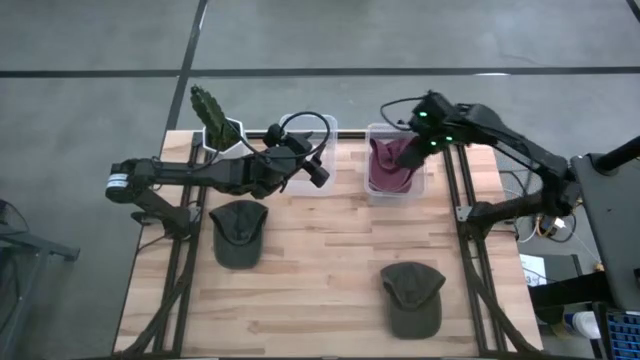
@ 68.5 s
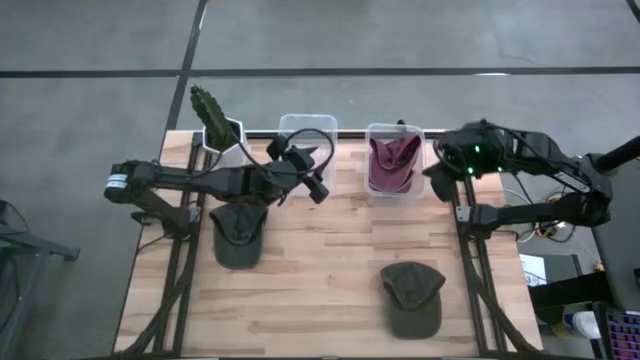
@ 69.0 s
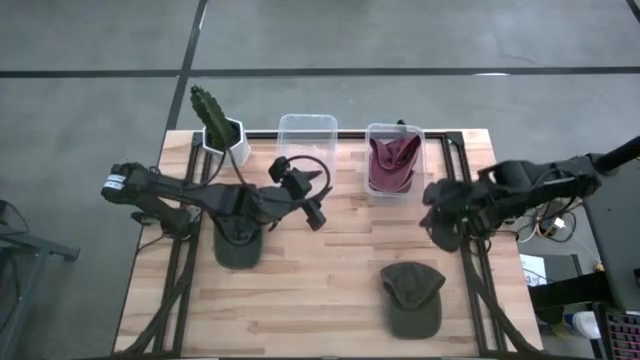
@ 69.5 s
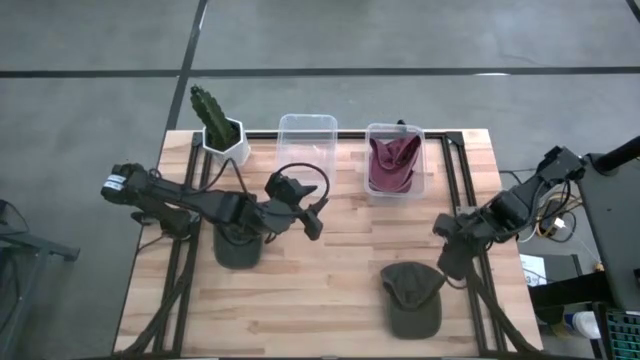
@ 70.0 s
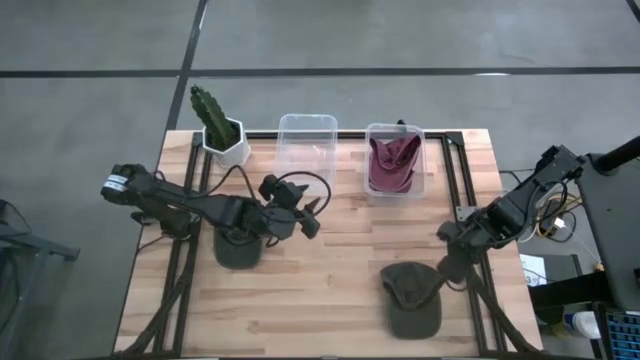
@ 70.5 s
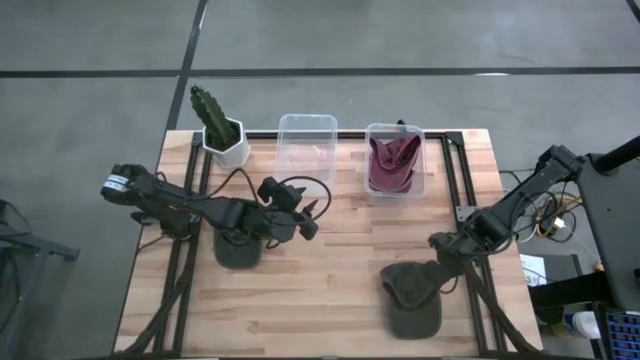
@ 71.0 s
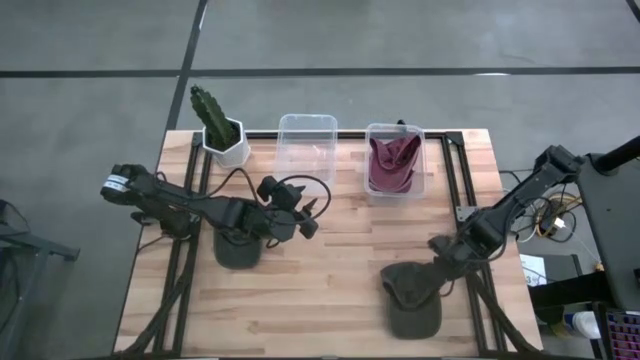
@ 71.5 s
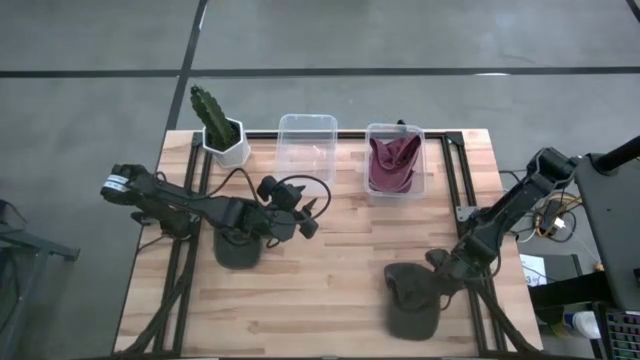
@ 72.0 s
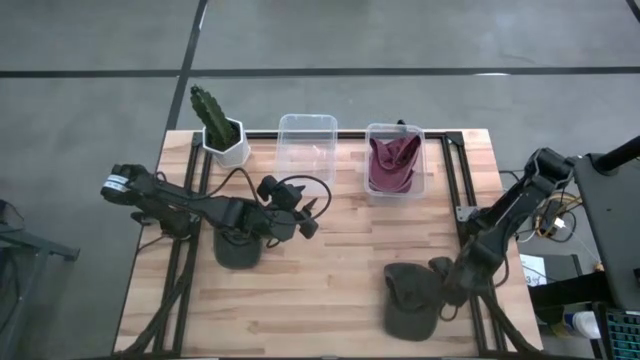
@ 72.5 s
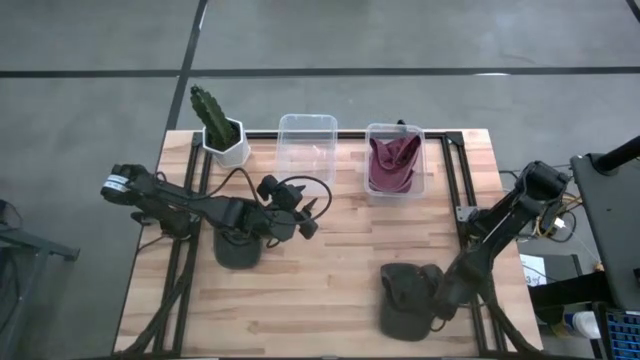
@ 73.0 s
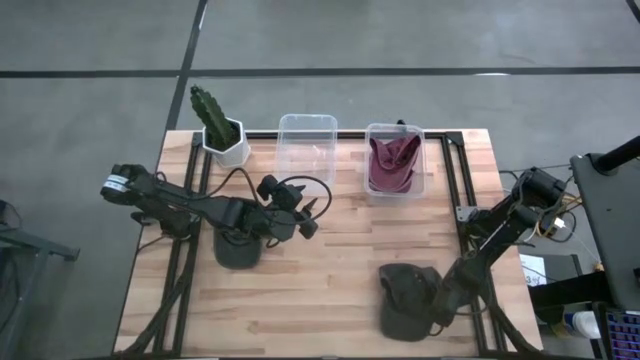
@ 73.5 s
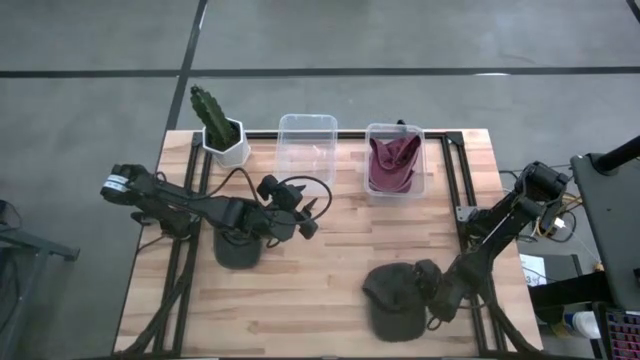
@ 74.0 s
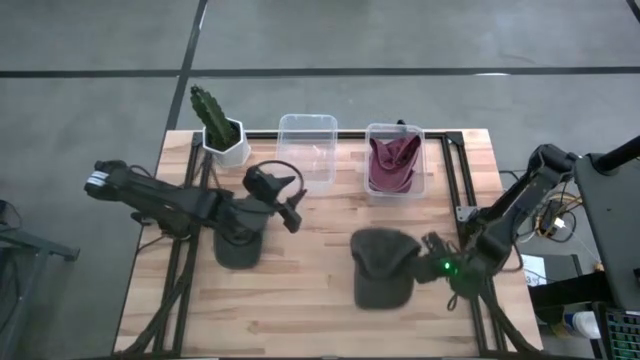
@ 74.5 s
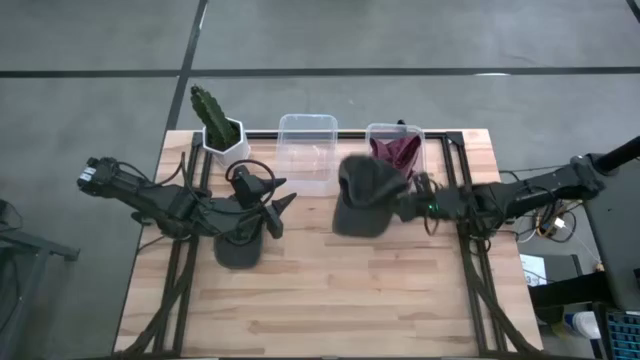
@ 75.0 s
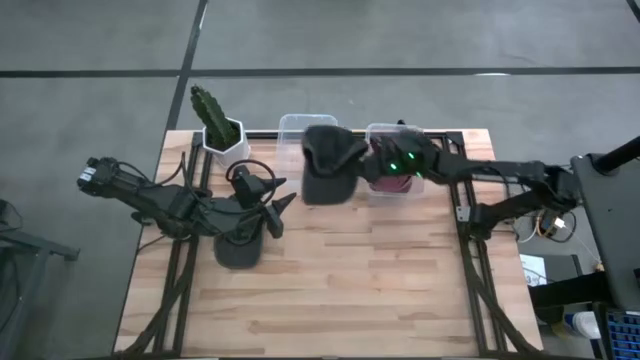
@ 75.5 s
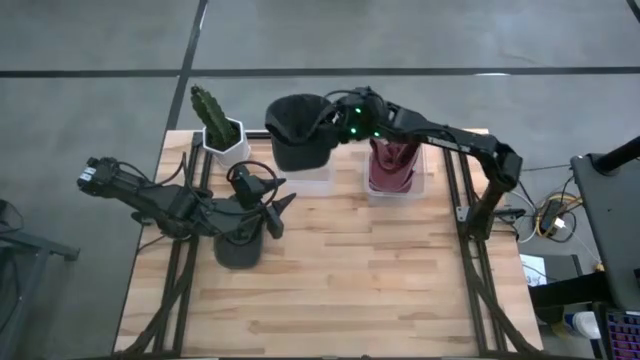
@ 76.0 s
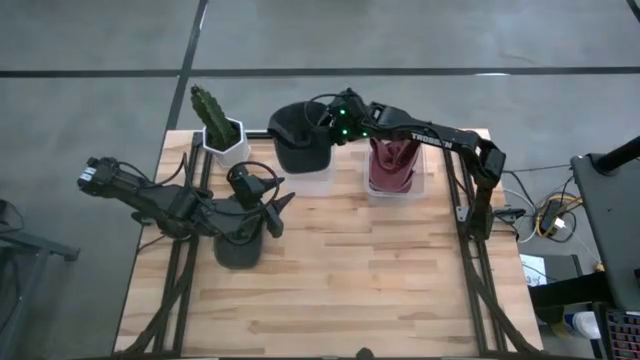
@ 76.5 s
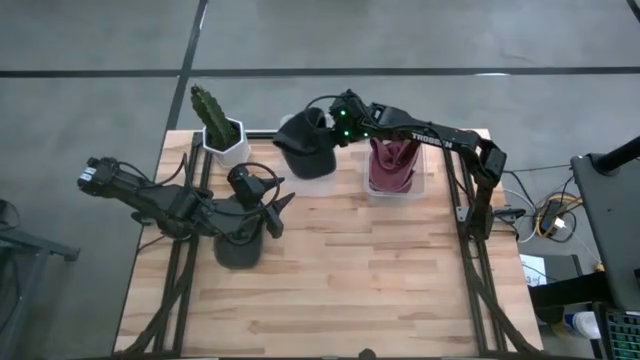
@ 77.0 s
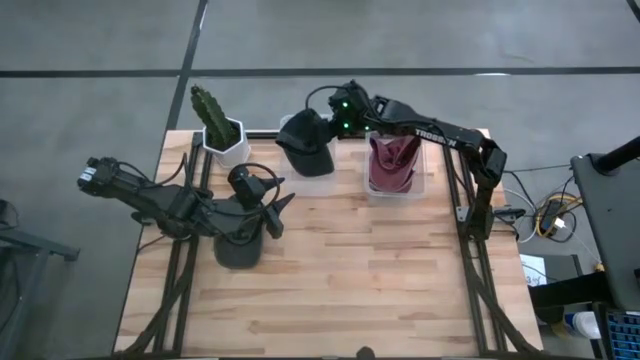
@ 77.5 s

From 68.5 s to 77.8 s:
Task: Pick & Place hat
Put the right black cap into the left transparent bin

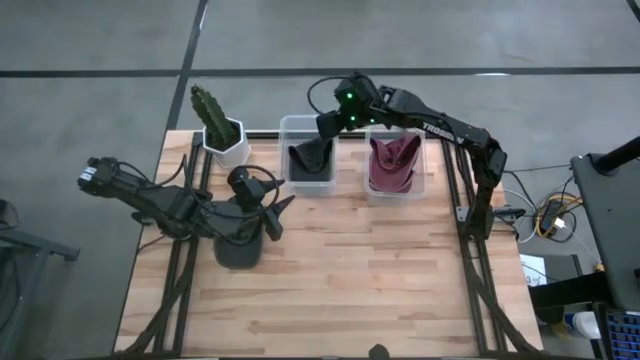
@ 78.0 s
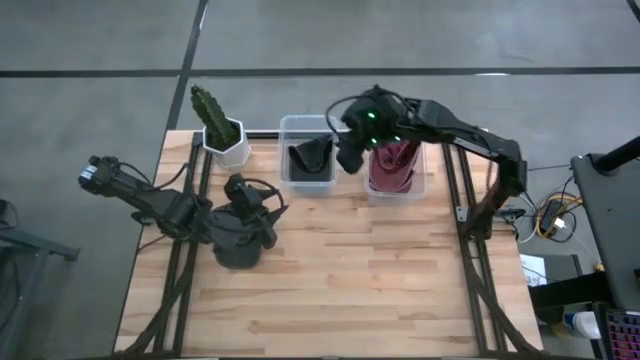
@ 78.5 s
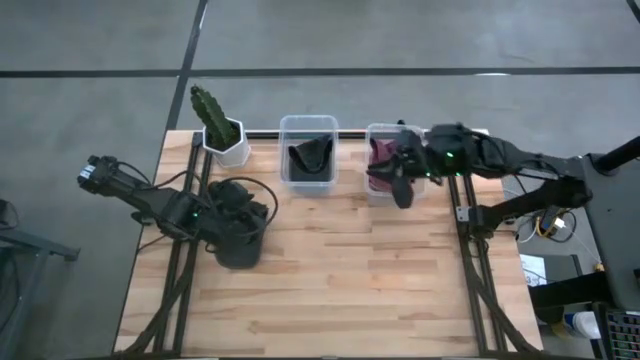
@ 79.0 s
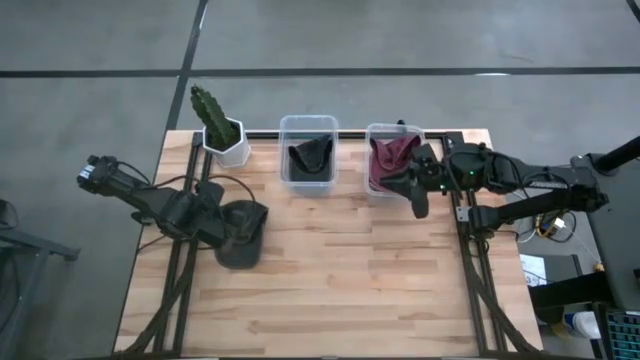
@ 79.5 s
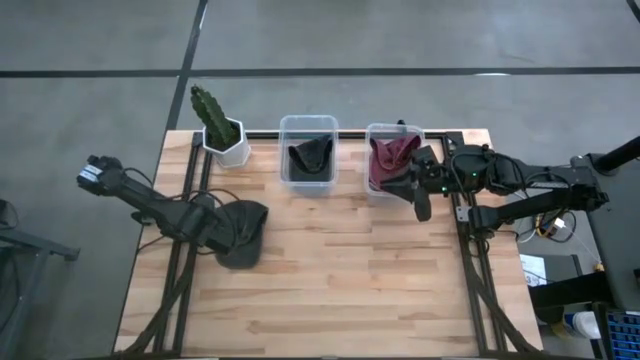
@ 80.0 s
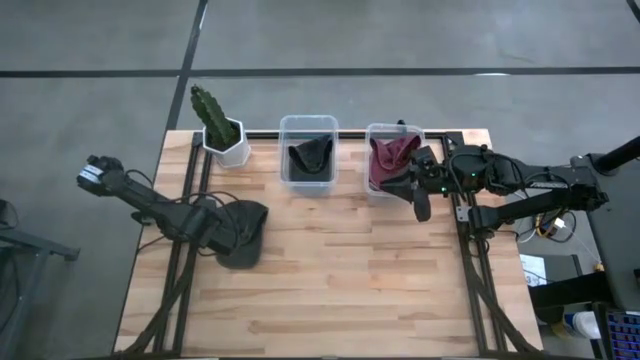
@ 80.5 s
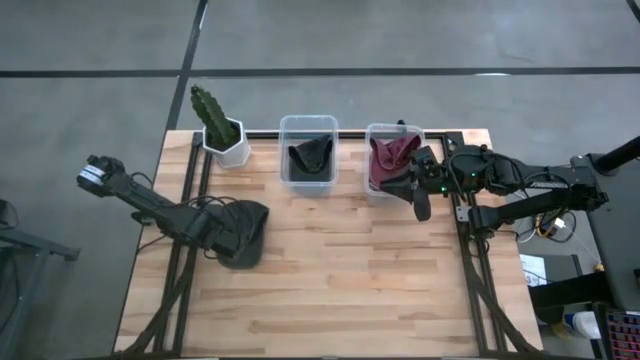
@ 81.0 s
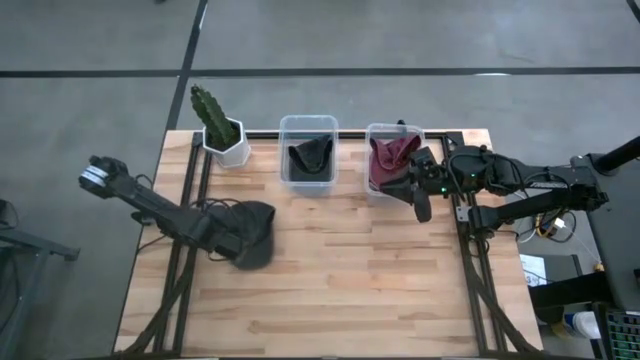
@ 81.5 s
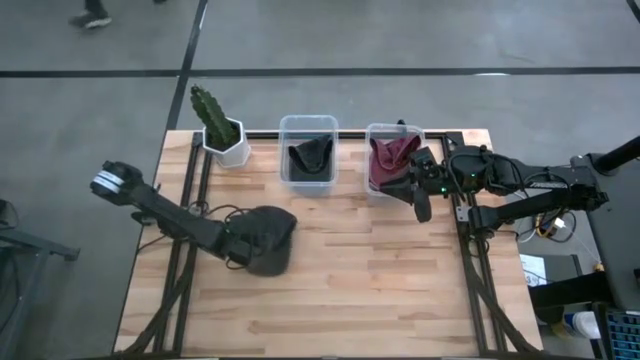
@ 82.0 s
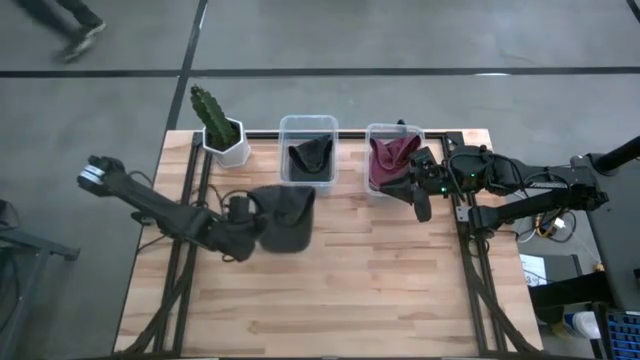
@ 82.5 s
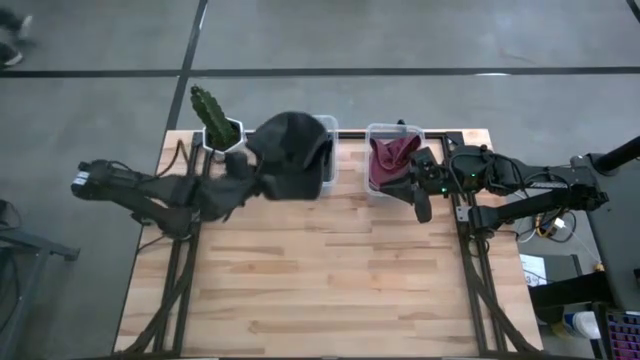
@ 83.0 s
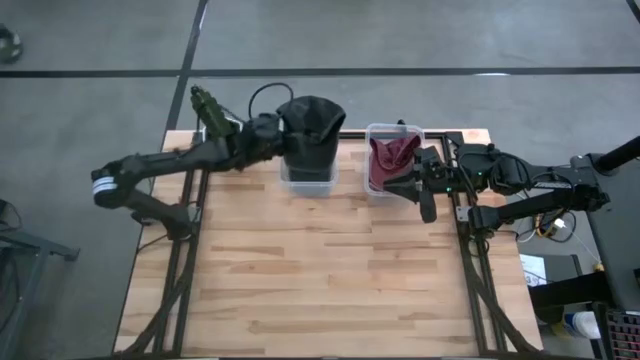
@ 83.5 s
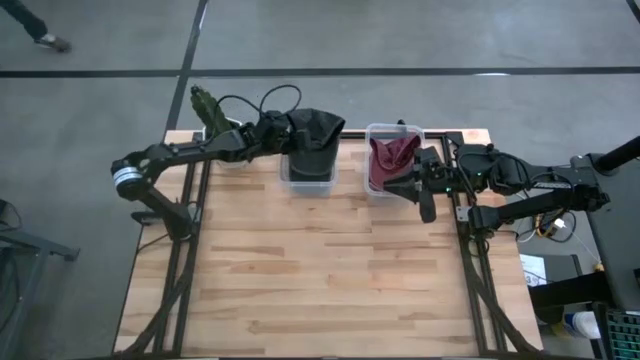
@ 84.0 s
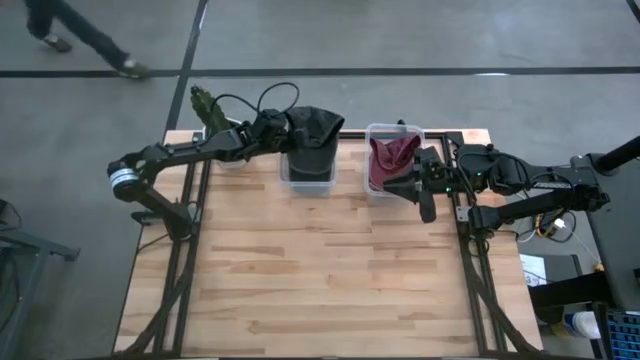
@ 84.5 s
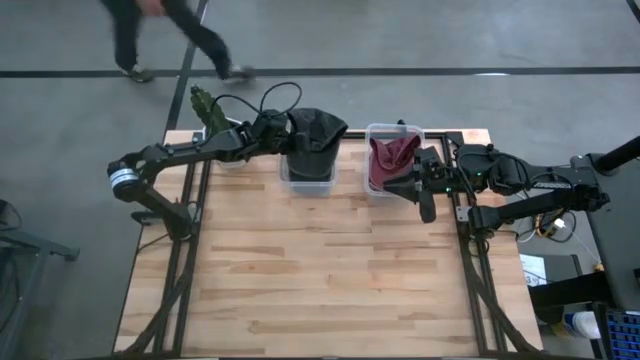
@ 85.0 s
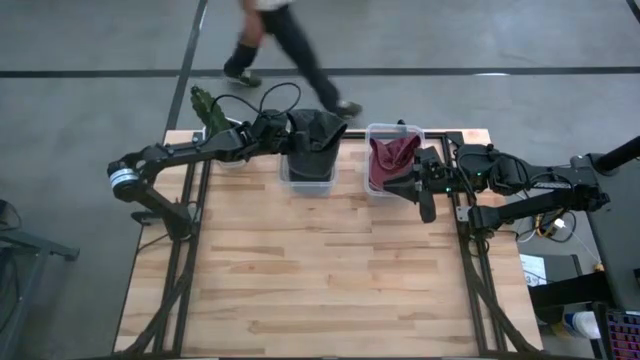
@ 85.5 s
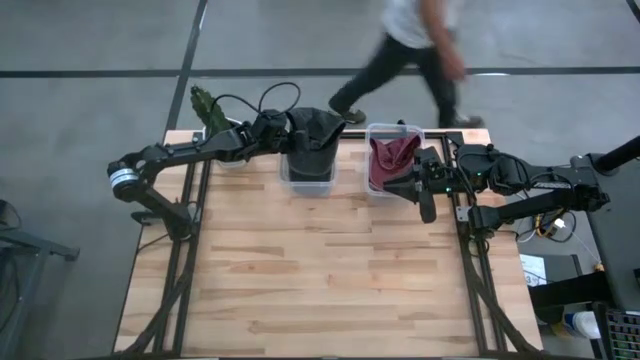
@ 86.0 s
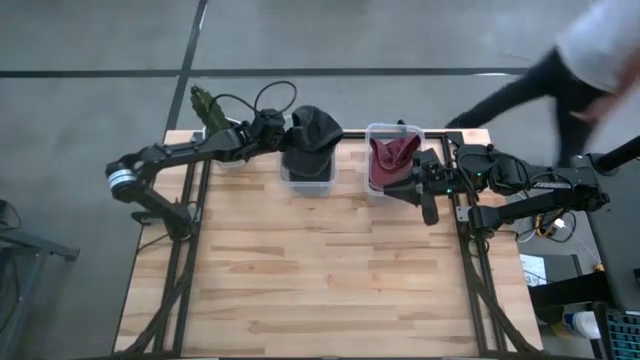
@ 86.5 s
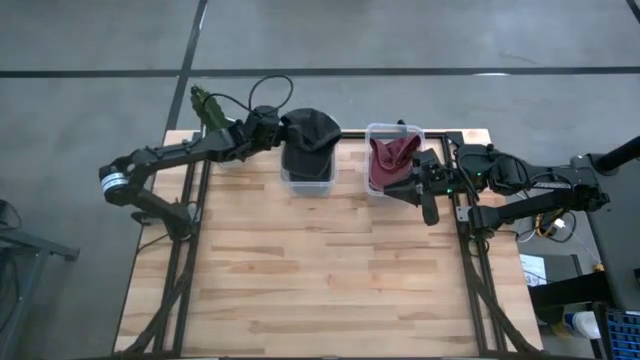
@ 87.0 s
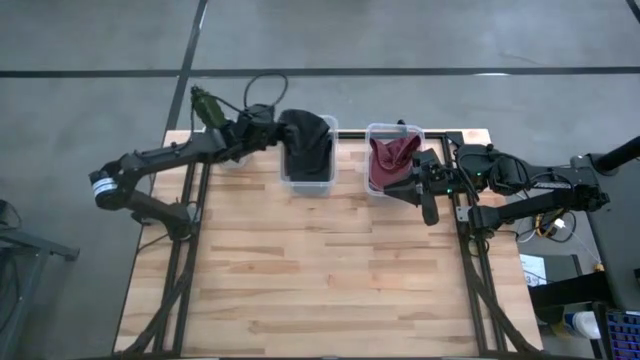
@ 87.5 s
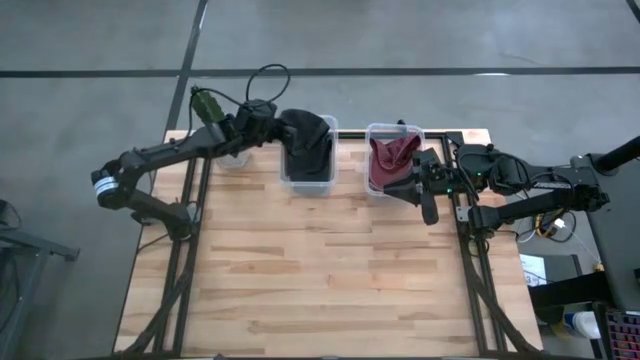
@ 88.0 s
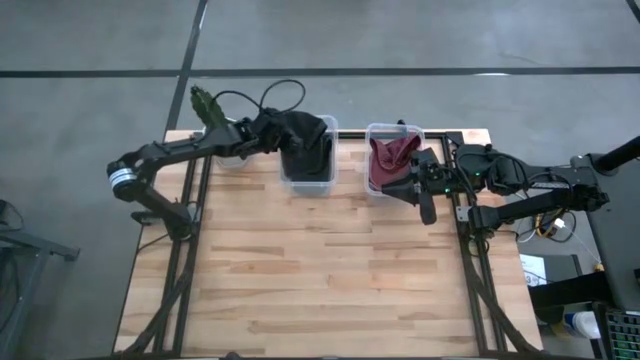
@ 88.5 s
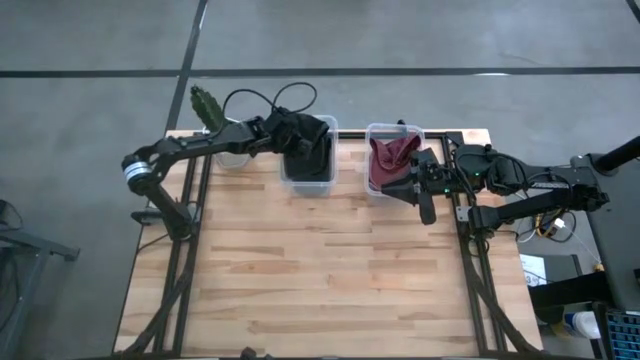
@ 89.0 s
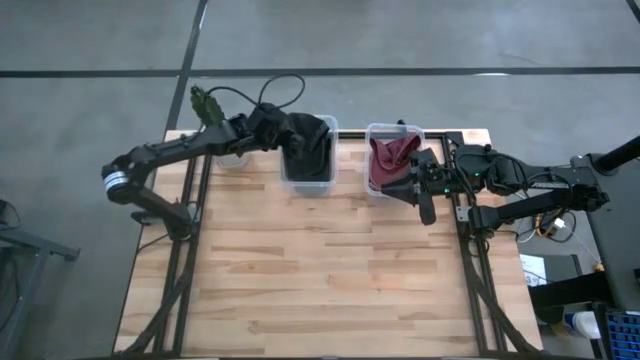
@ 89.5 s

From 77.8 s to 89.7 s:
Put the black cap into the left transparent bin
